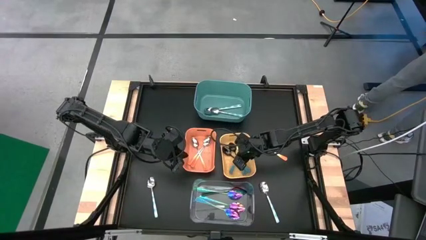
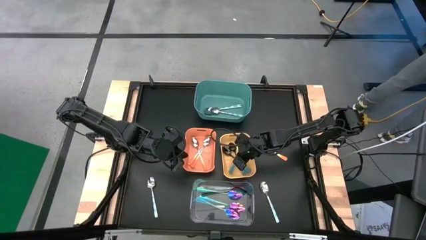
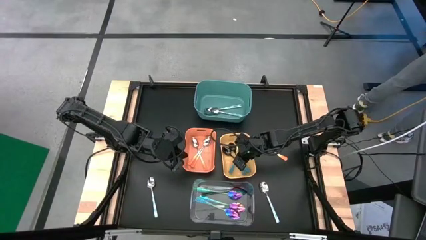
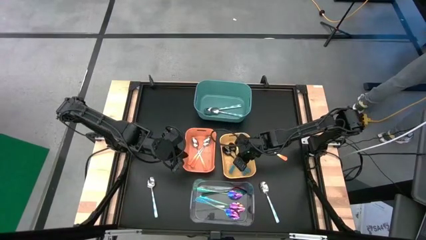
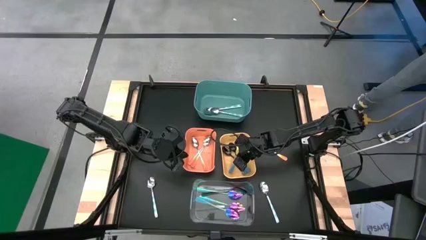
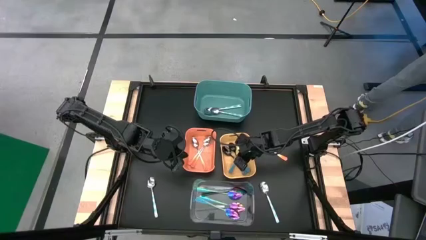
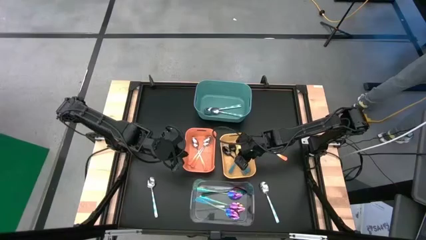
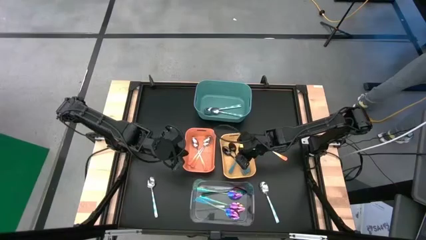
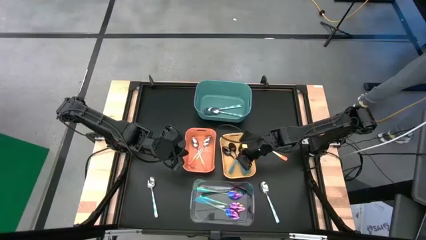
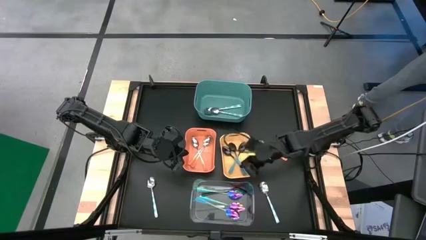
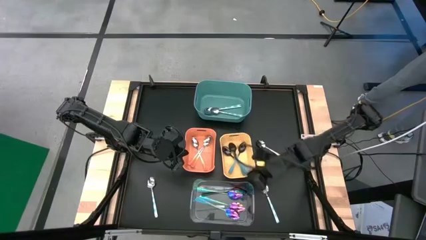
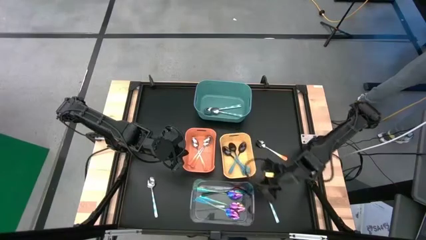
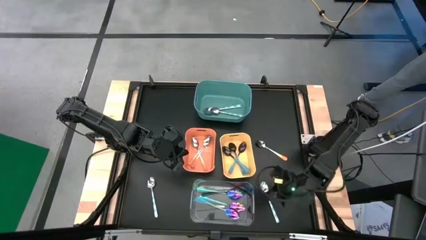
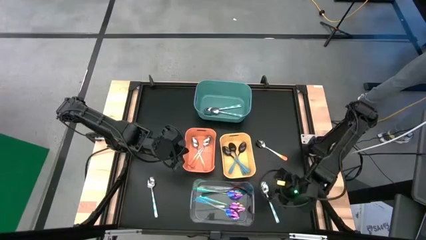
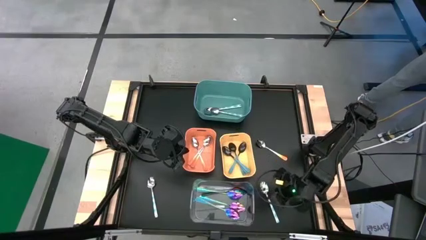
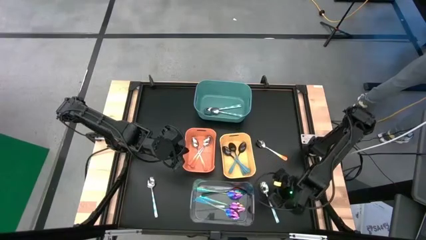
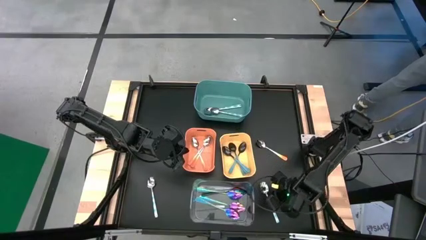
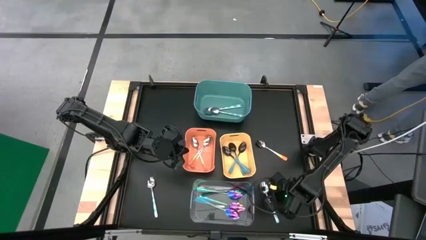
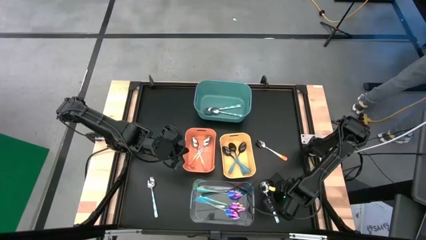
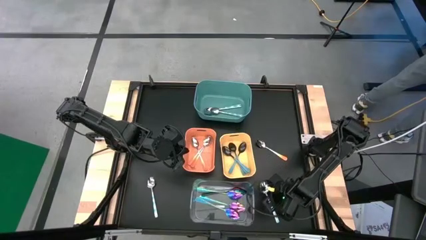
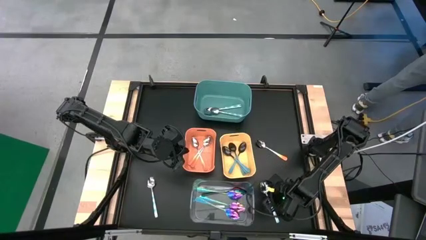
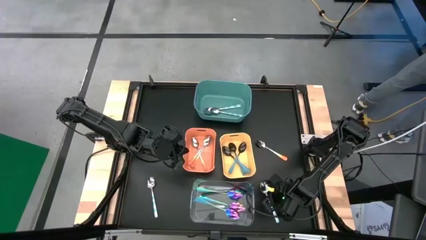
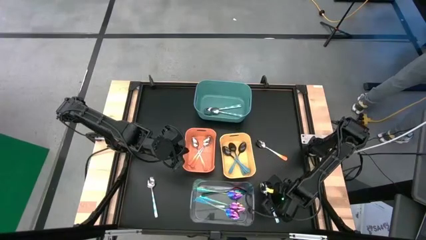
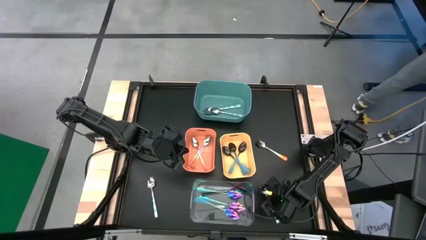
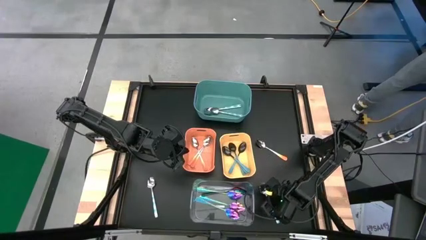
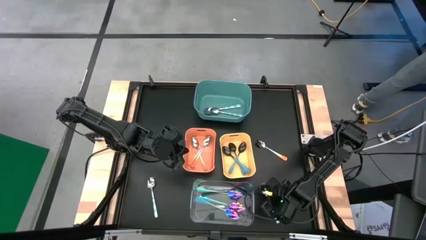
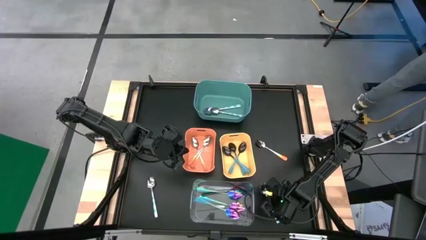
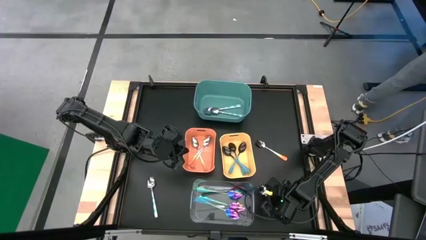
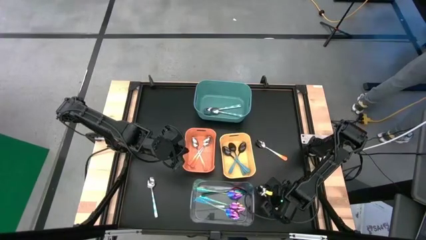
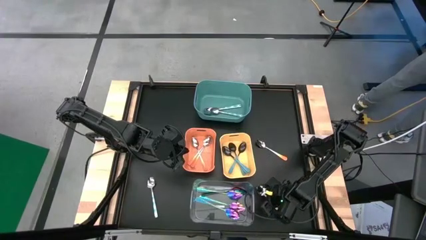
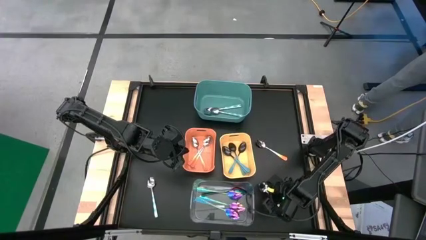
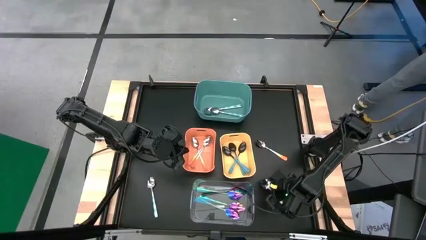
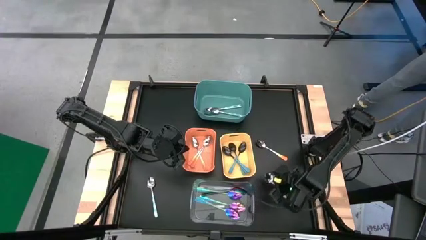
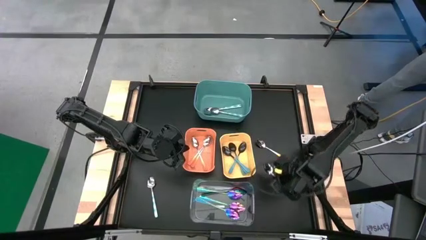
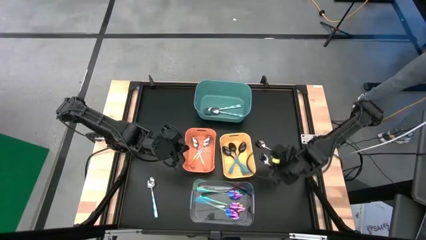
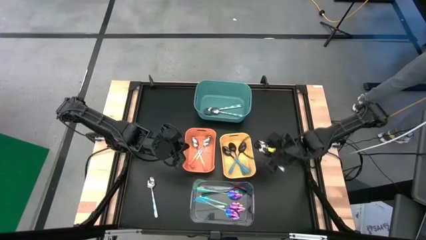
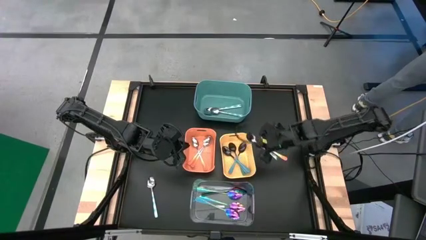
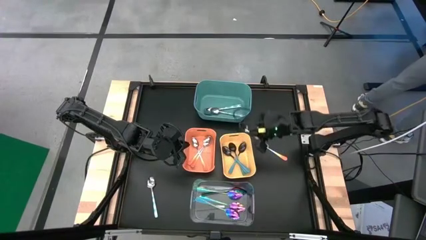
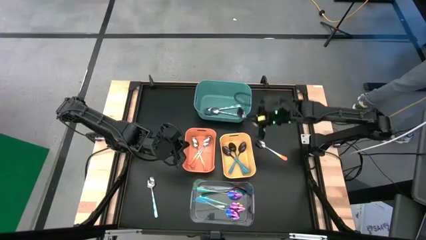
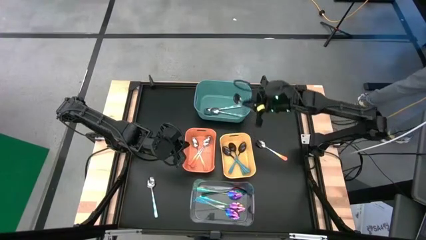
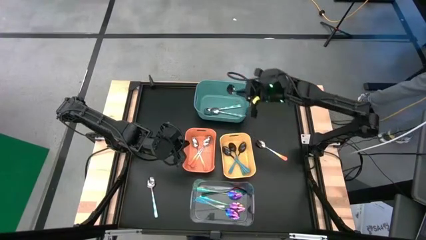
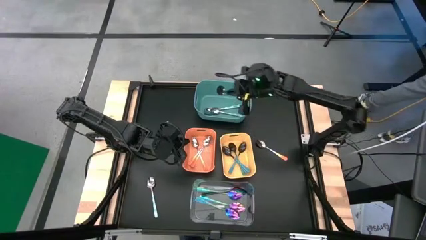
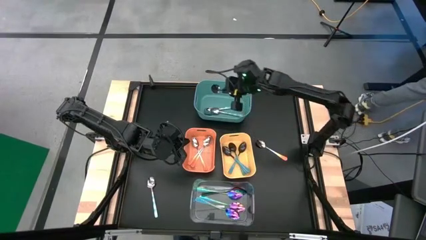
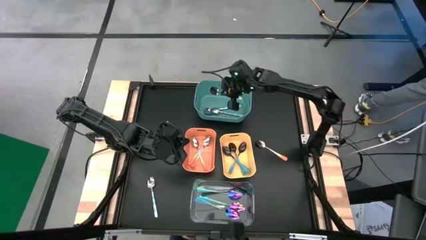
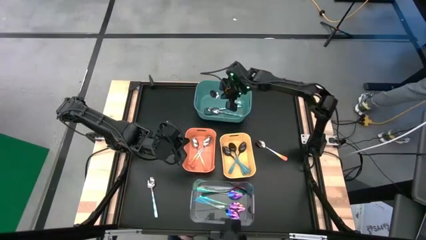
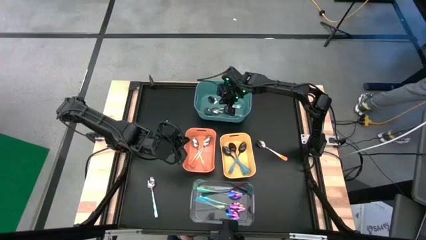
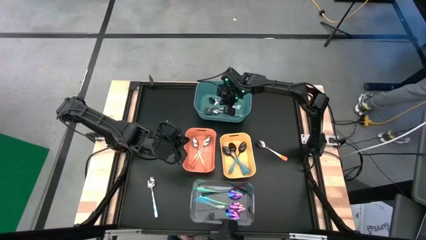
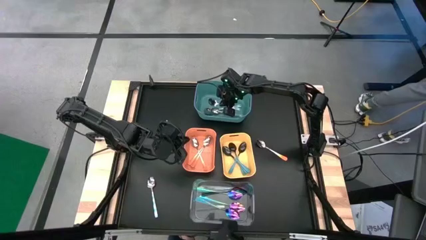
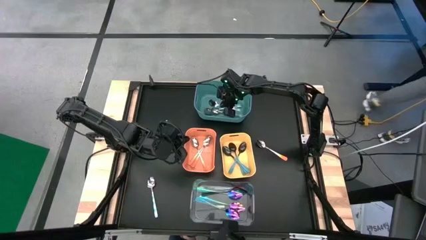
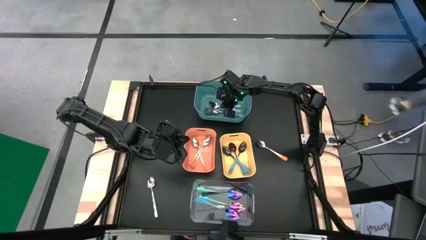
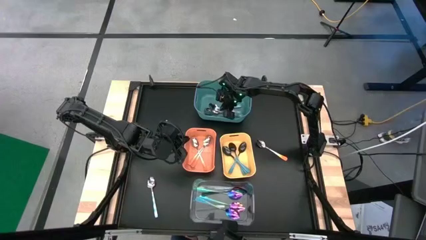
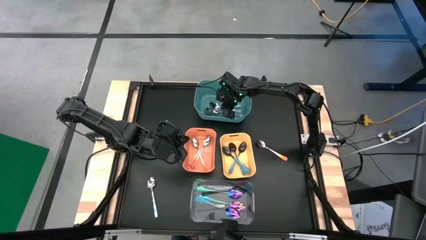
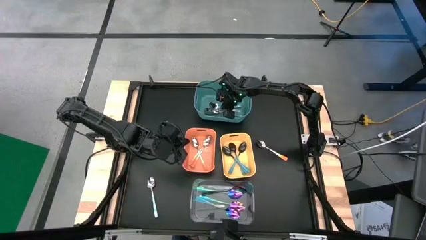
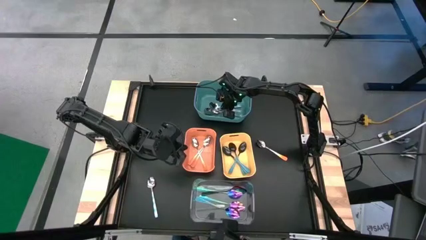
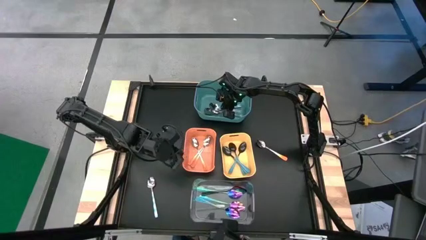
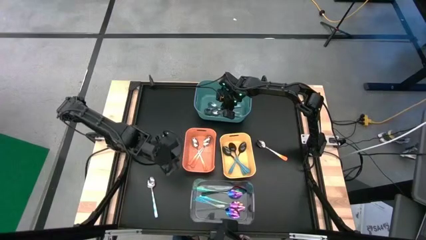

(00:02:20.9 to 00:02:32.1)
Task: Sort silverware by color (type)
Put the white patterned spoon into the green bin
